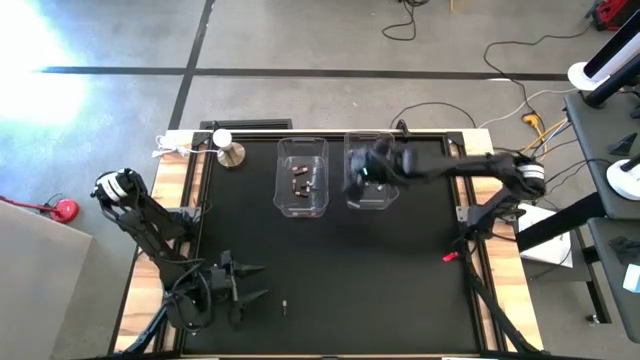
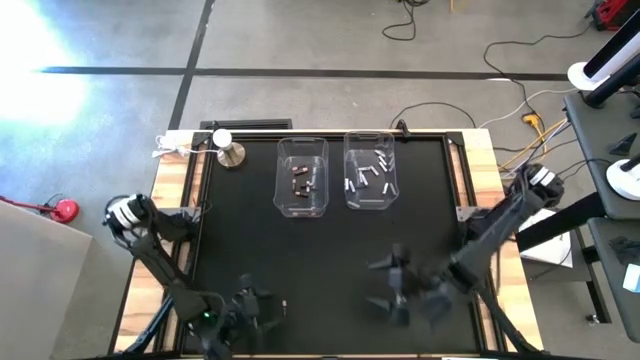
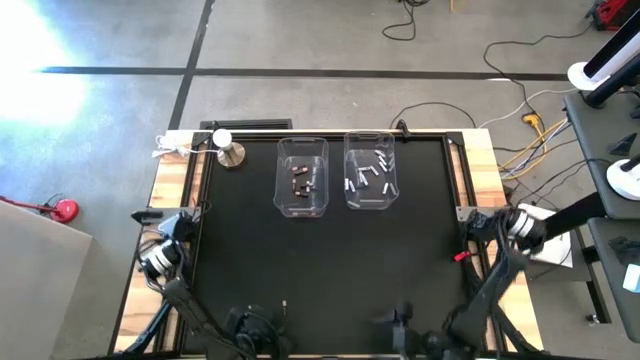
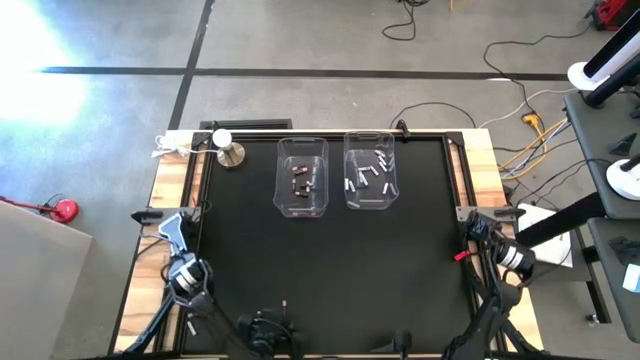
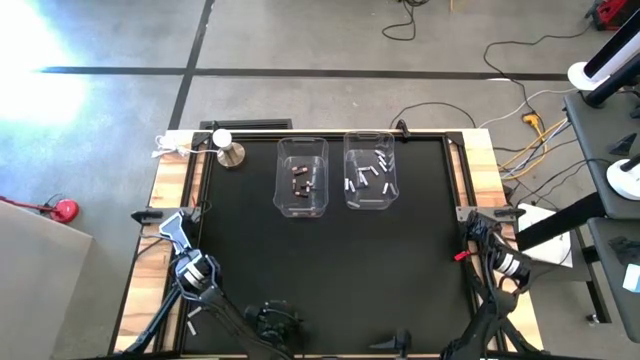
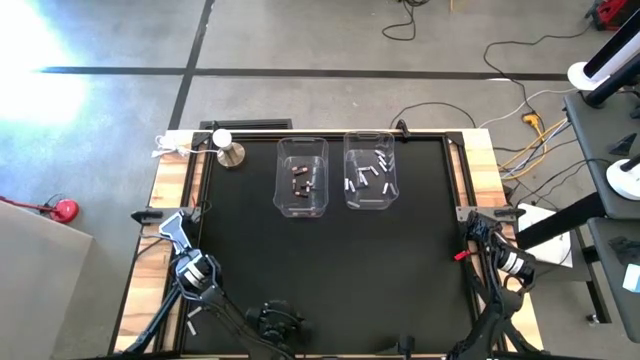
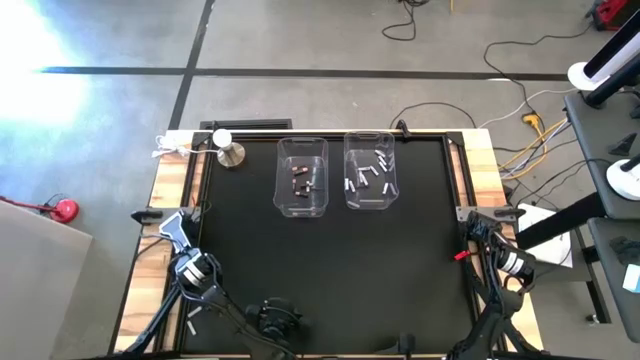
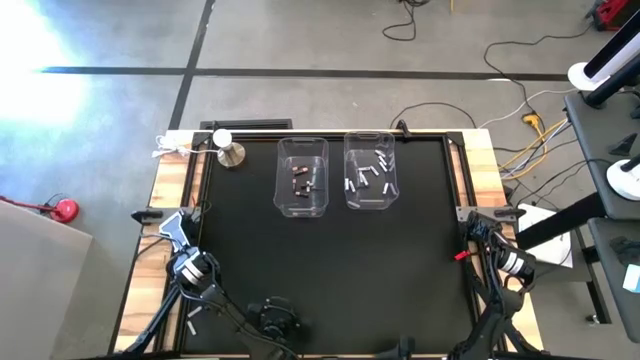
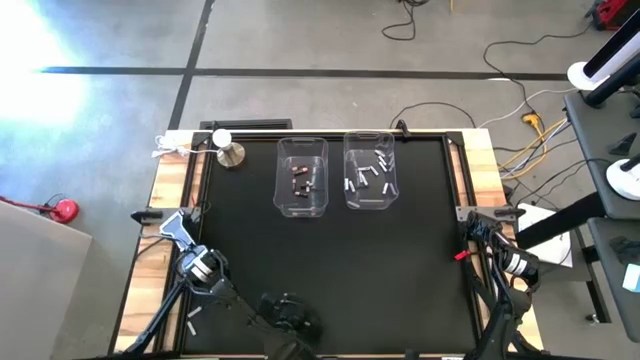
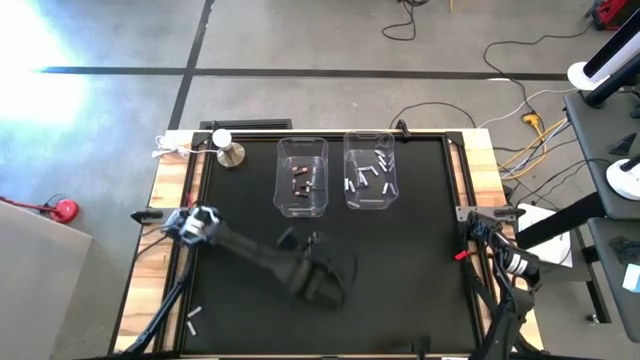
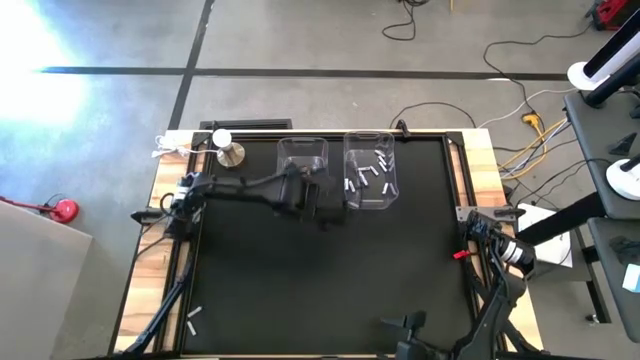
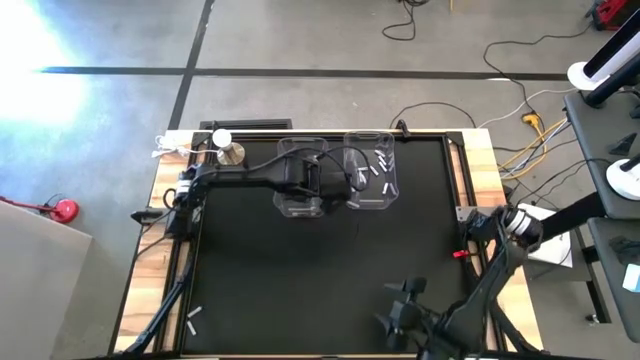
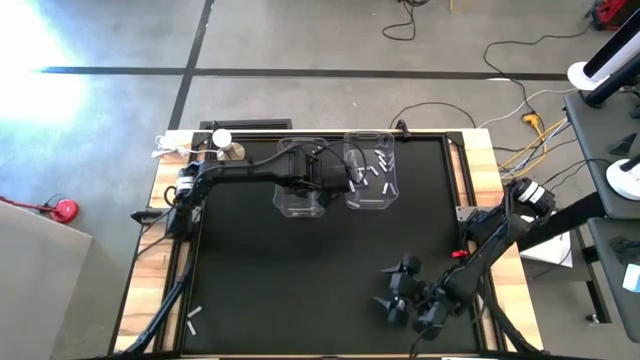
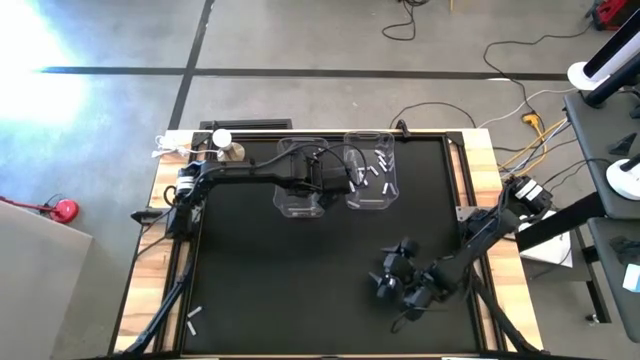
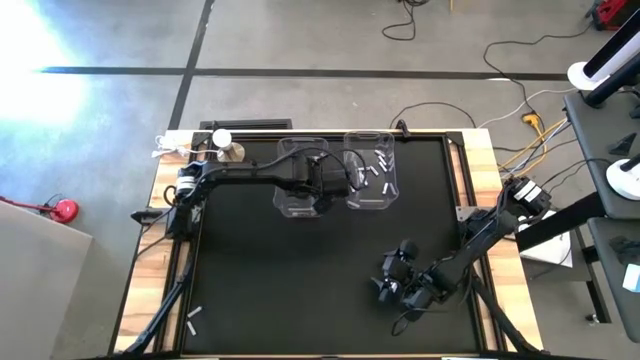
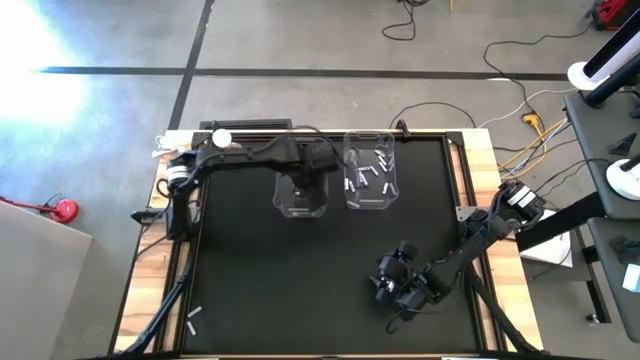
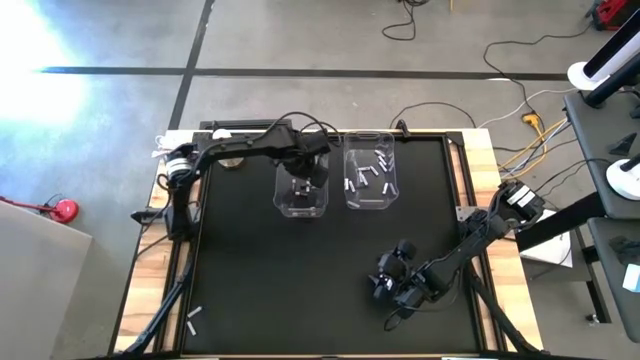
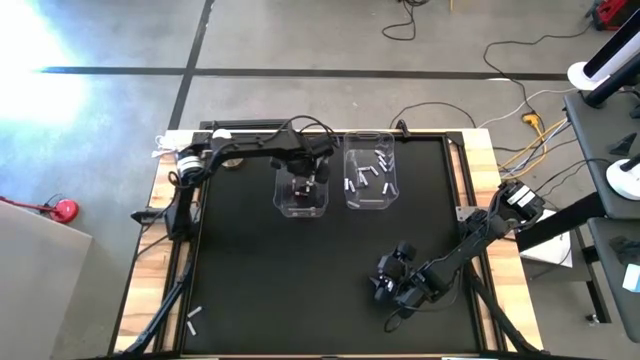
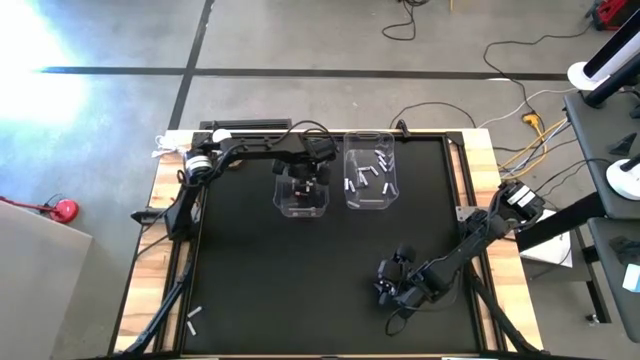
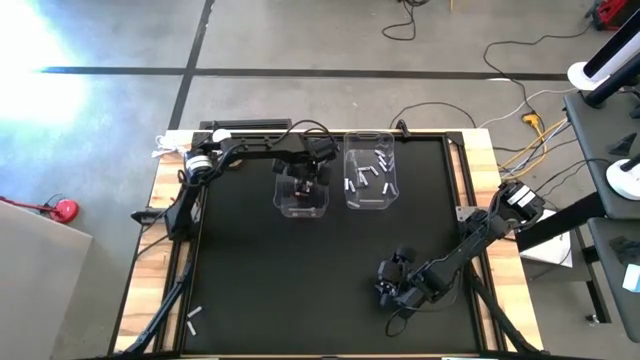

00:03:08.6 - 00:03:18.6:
Task: Sort batteries
Put the black battery into the left transparent bin

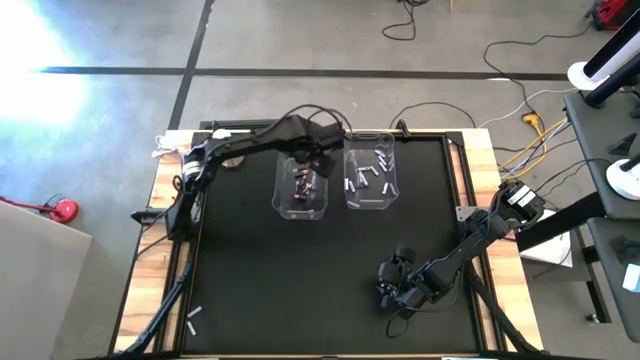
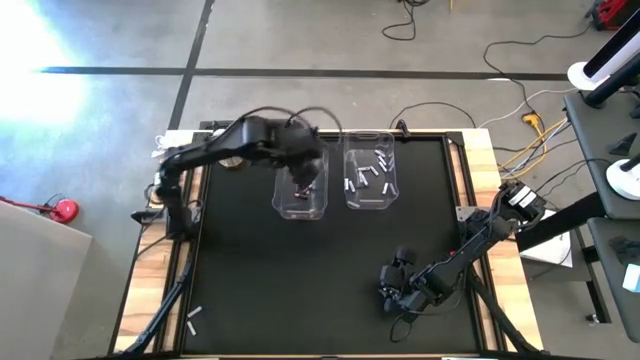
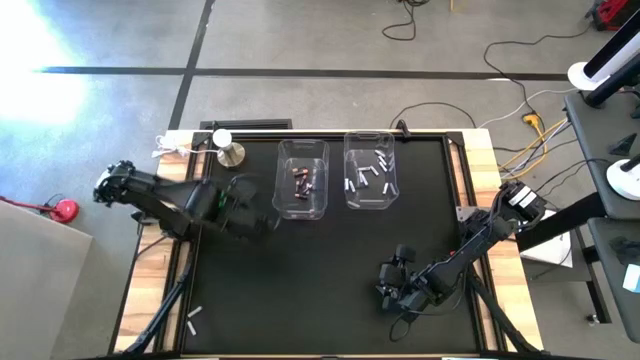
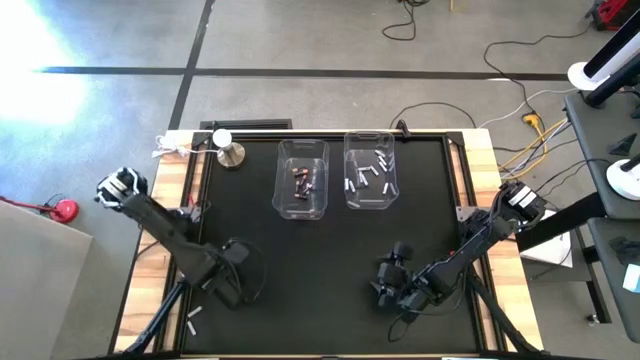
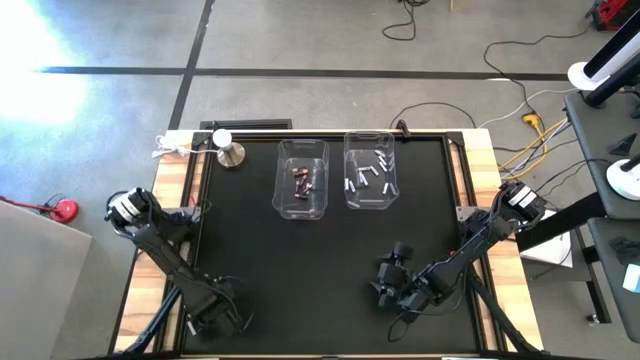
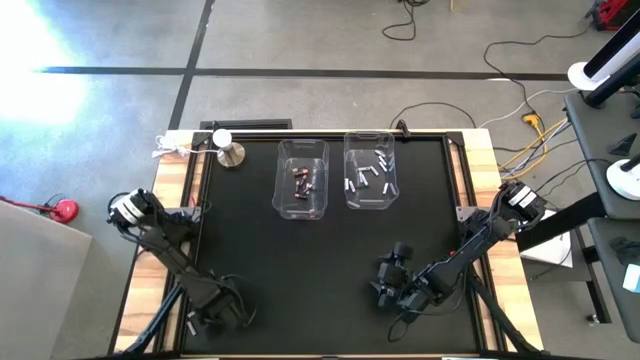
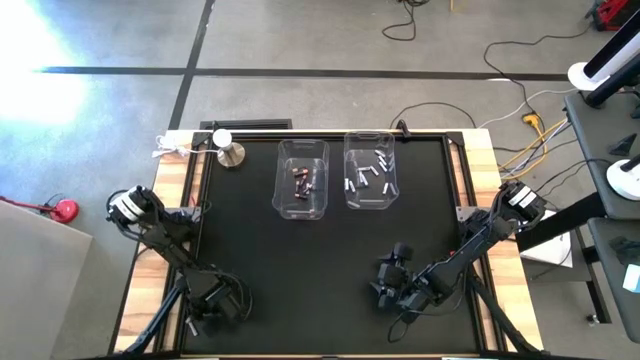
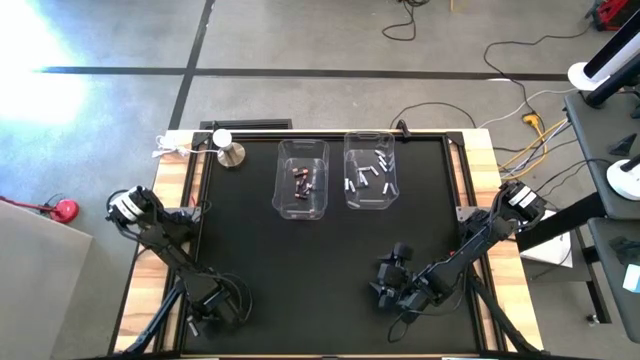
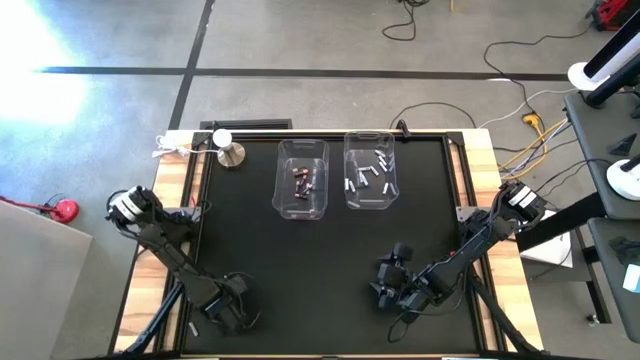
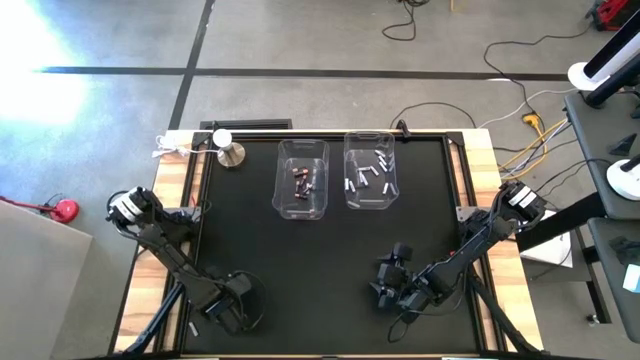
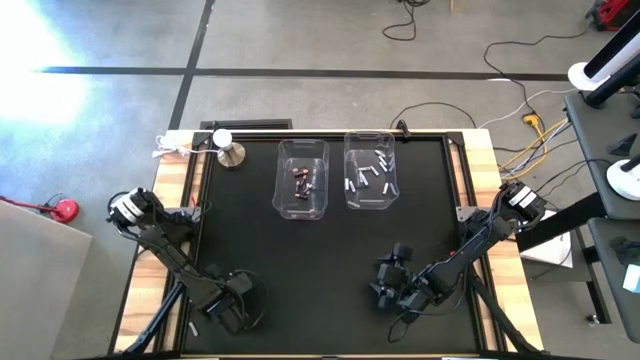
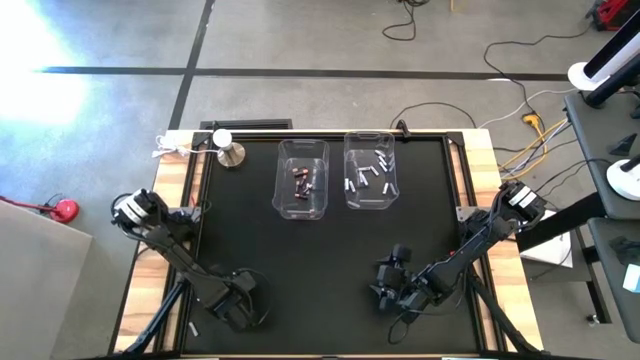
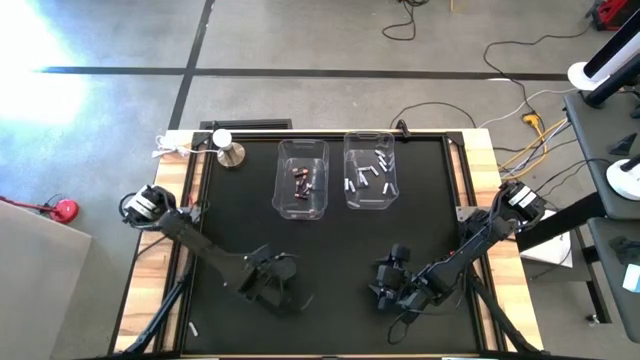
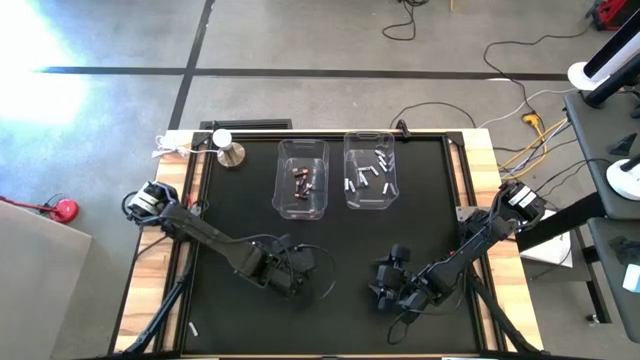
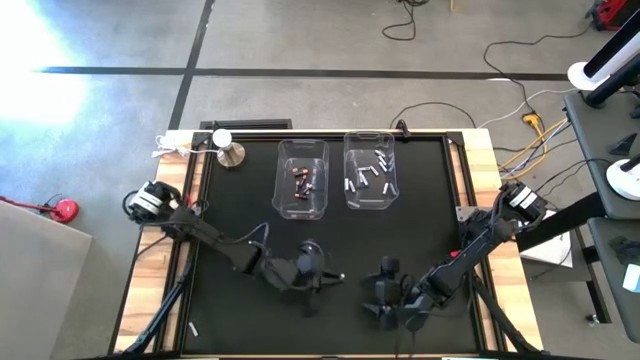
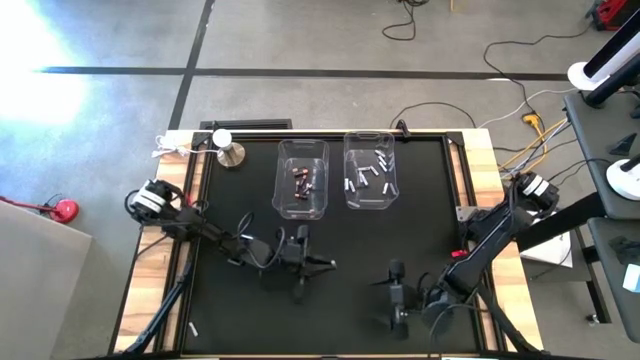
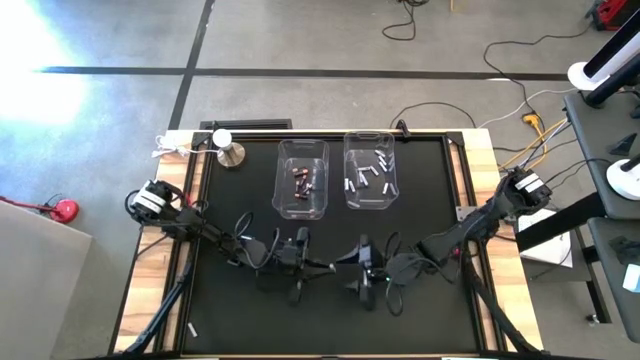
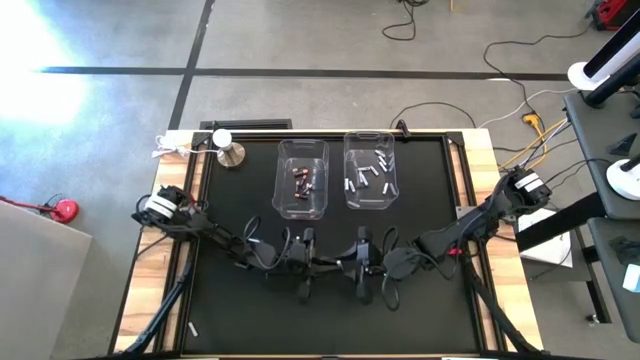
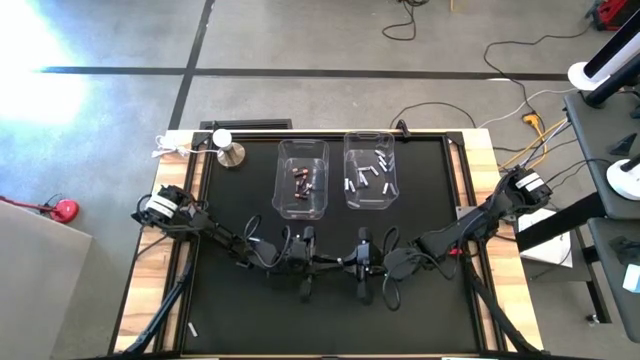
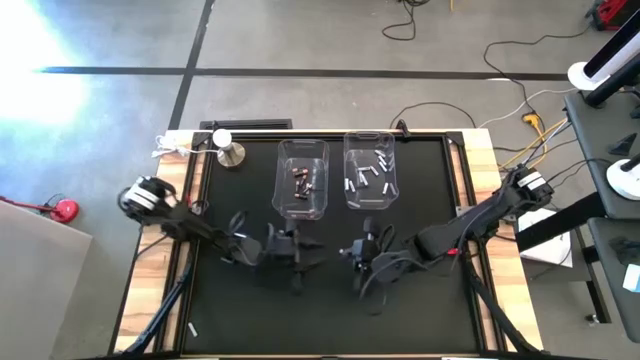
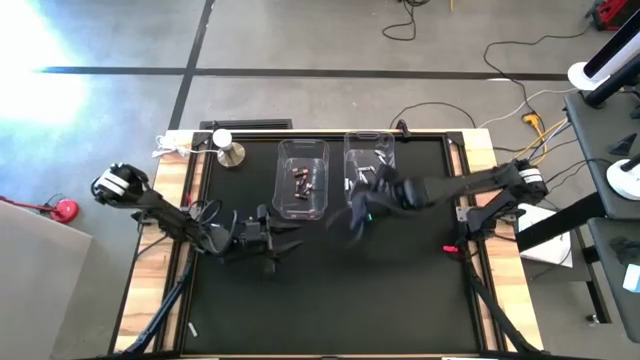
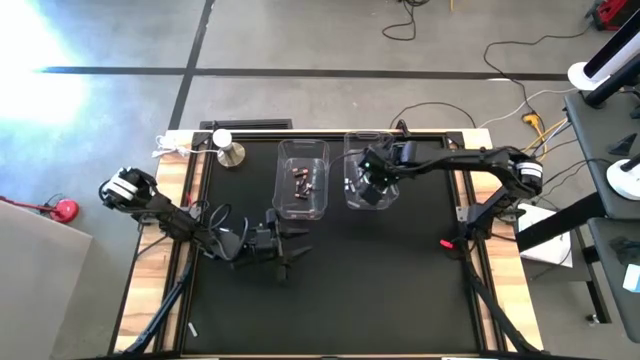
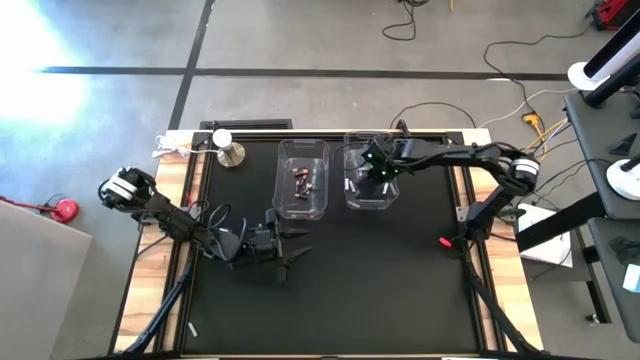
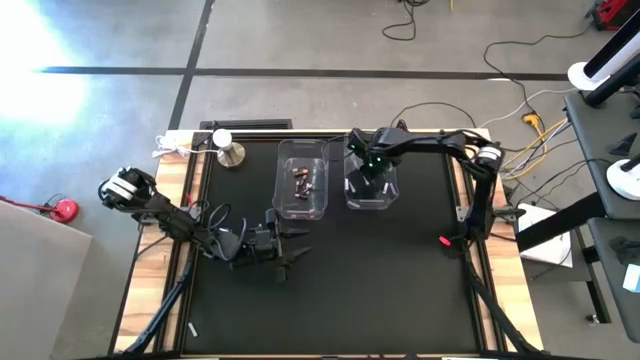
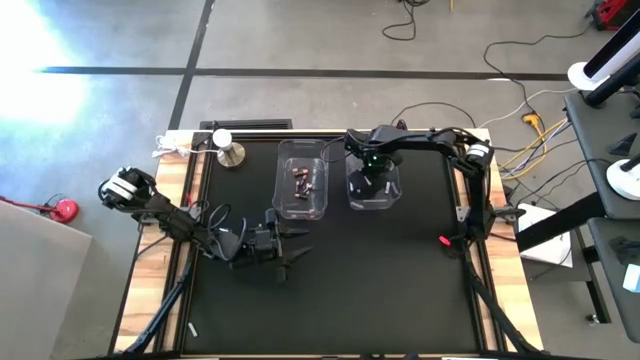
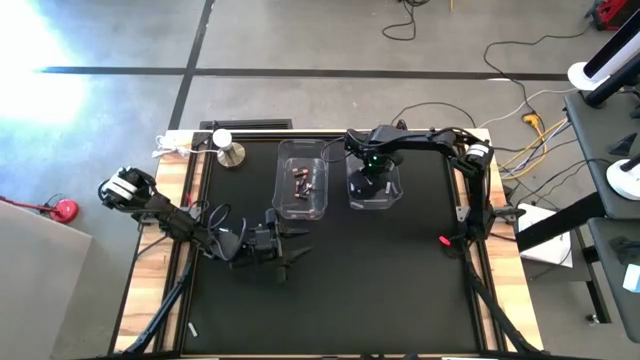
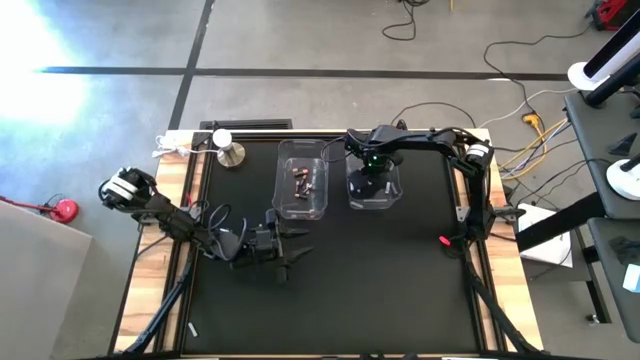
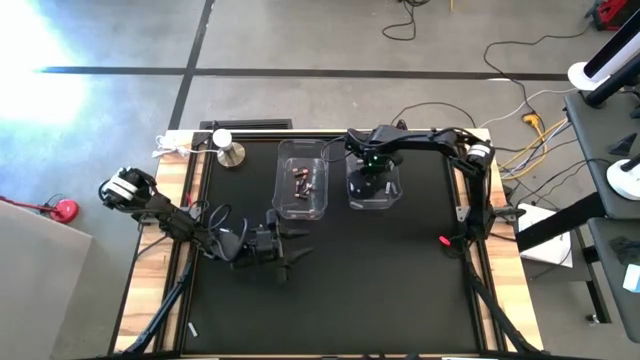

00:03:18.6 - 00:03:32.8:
Put the white battery into the right transparent bin
